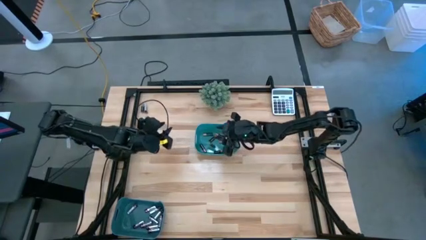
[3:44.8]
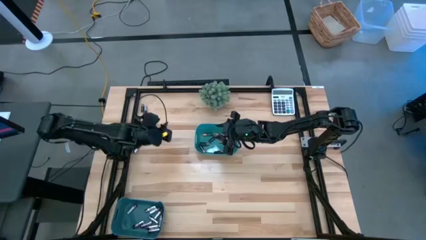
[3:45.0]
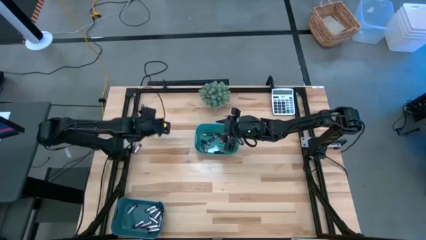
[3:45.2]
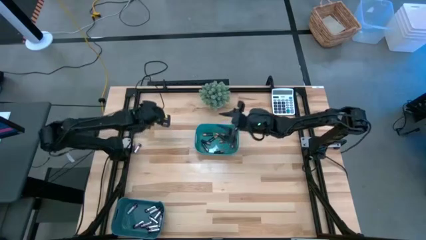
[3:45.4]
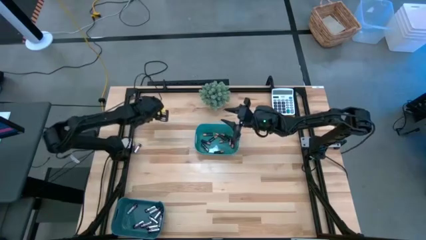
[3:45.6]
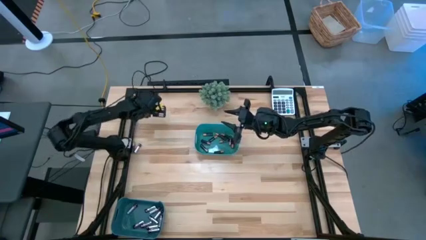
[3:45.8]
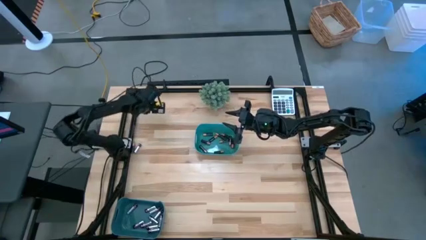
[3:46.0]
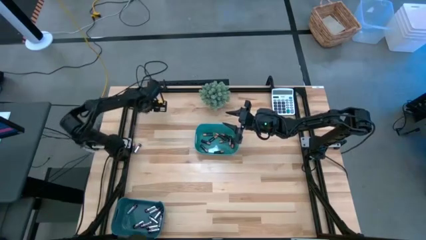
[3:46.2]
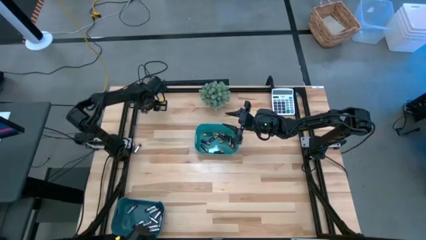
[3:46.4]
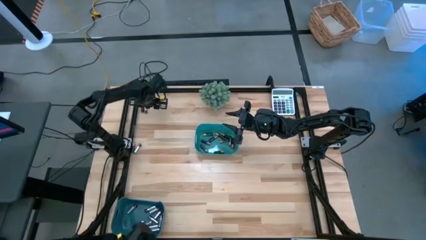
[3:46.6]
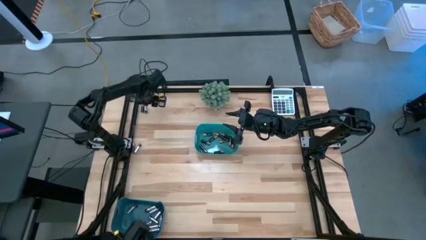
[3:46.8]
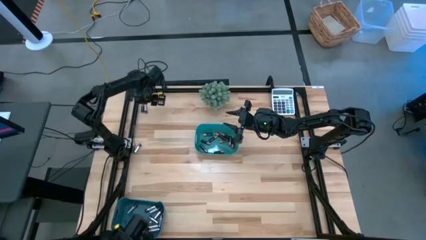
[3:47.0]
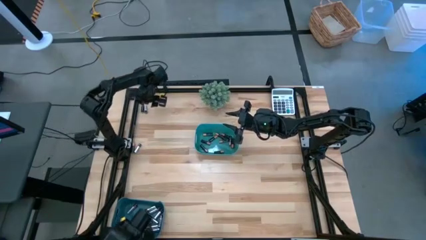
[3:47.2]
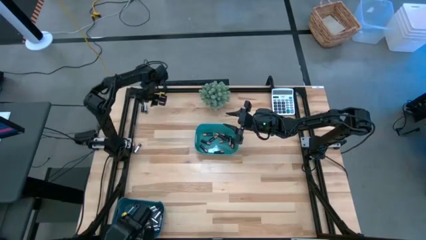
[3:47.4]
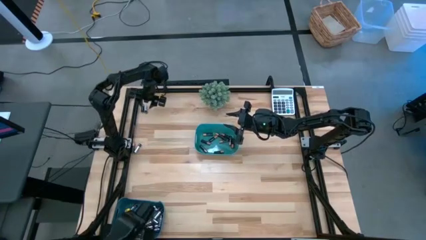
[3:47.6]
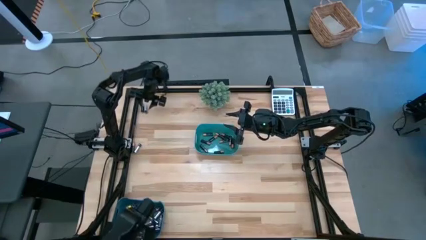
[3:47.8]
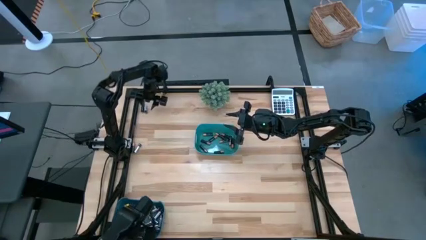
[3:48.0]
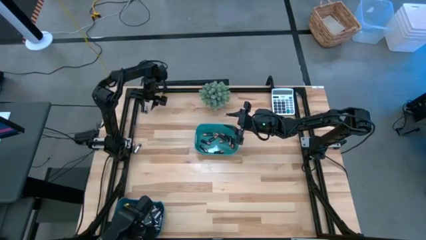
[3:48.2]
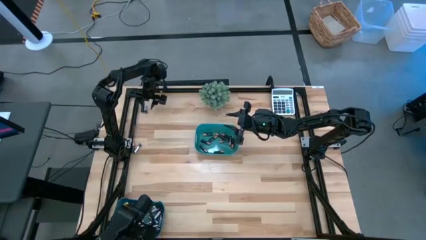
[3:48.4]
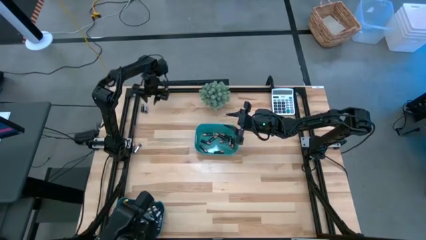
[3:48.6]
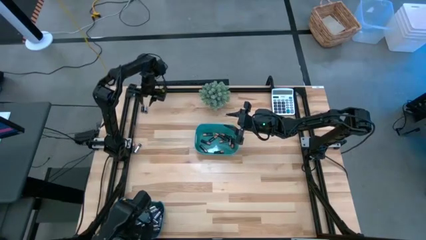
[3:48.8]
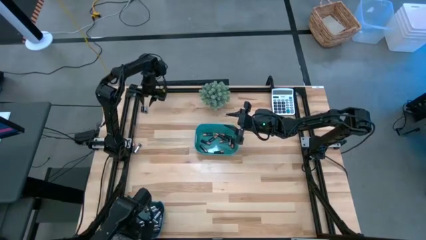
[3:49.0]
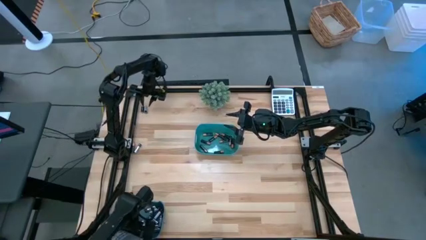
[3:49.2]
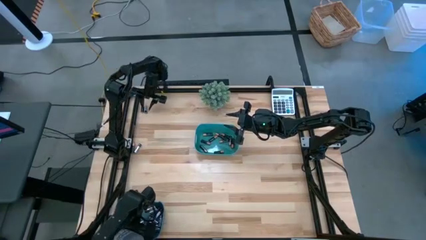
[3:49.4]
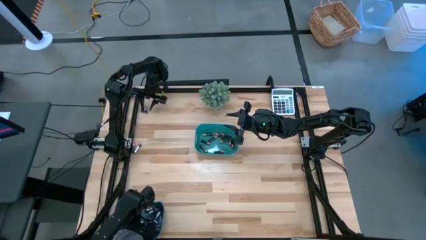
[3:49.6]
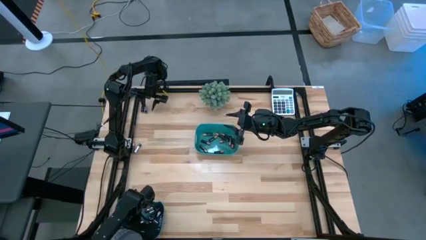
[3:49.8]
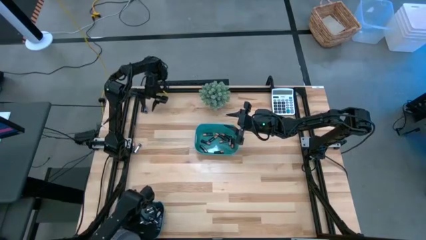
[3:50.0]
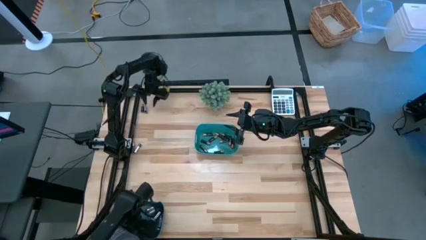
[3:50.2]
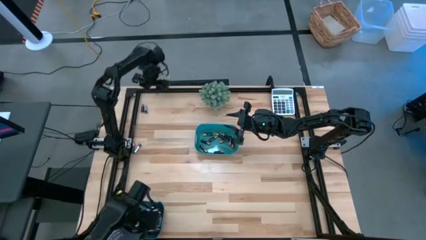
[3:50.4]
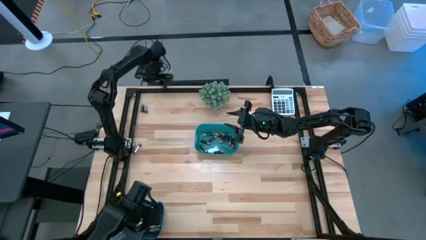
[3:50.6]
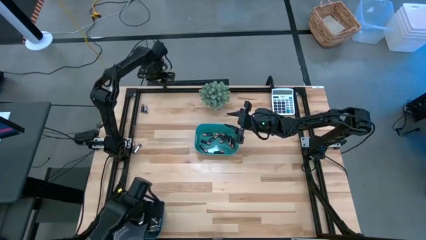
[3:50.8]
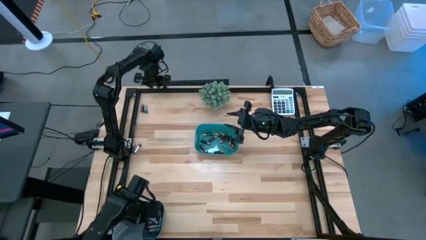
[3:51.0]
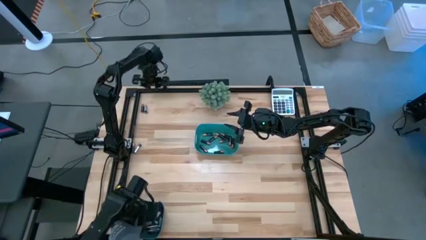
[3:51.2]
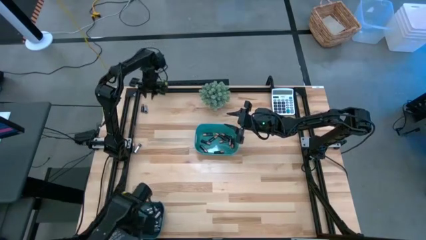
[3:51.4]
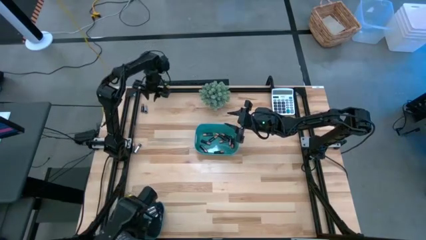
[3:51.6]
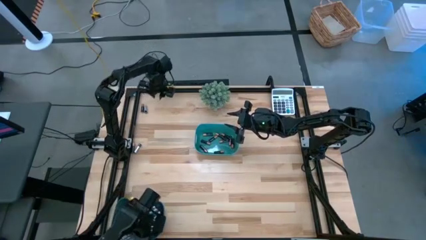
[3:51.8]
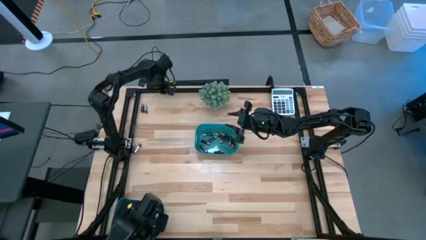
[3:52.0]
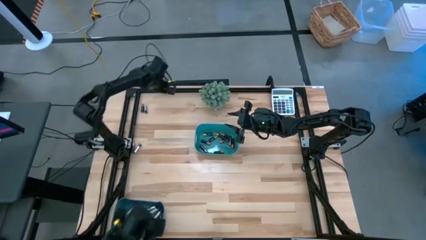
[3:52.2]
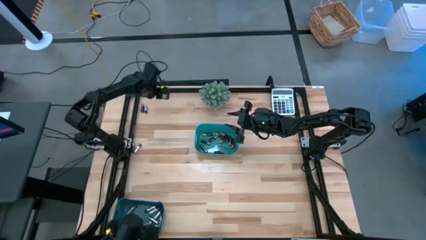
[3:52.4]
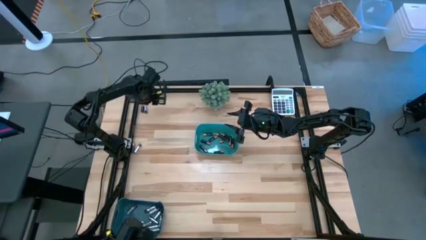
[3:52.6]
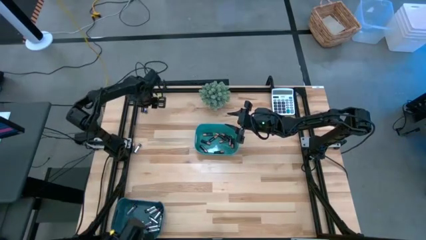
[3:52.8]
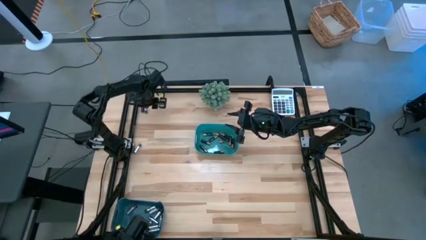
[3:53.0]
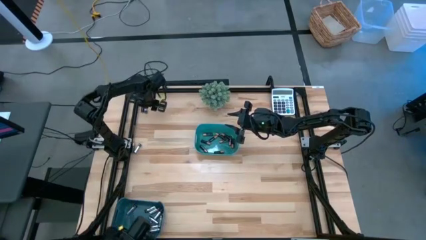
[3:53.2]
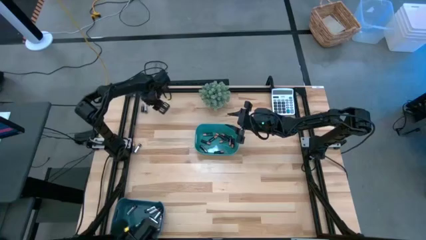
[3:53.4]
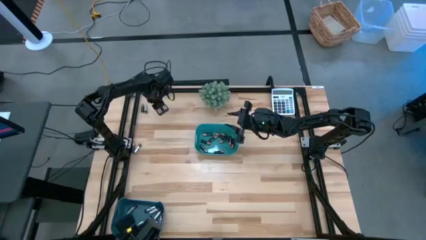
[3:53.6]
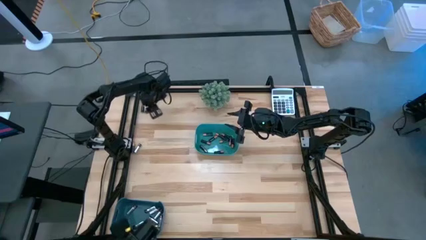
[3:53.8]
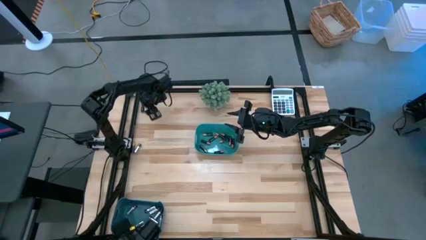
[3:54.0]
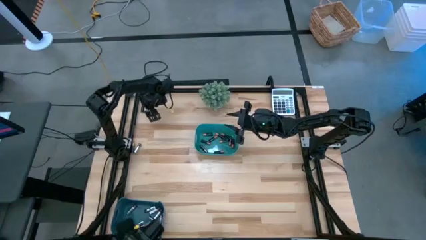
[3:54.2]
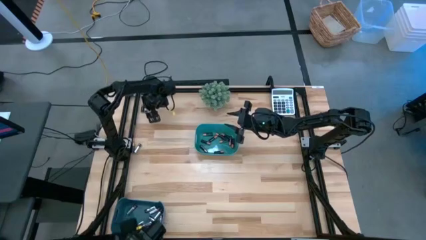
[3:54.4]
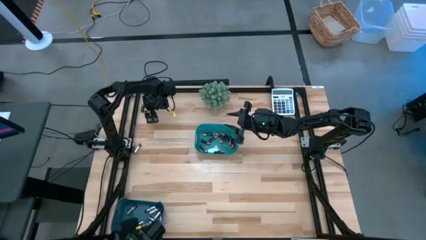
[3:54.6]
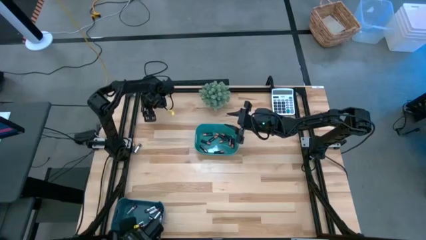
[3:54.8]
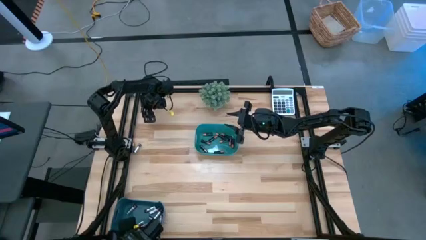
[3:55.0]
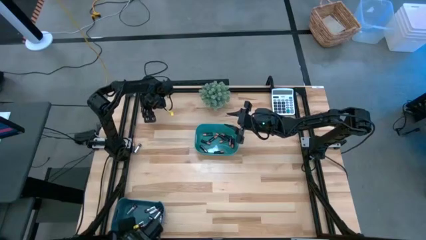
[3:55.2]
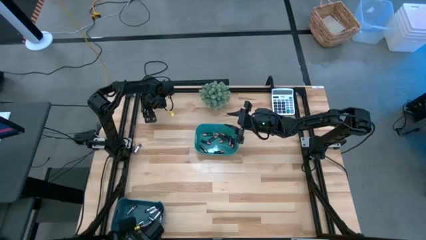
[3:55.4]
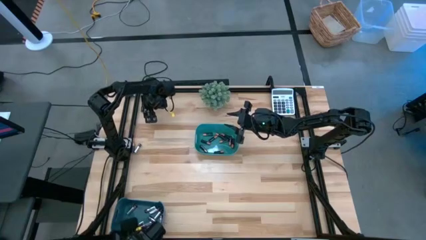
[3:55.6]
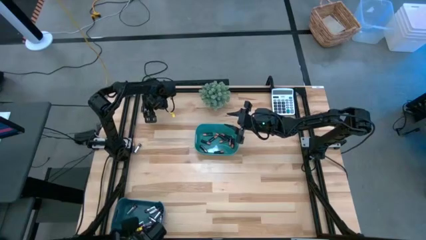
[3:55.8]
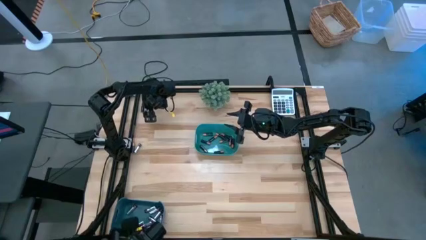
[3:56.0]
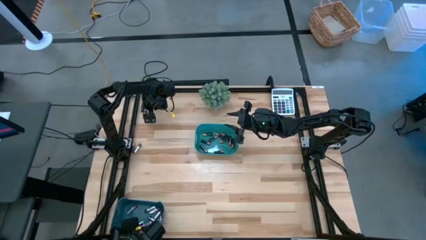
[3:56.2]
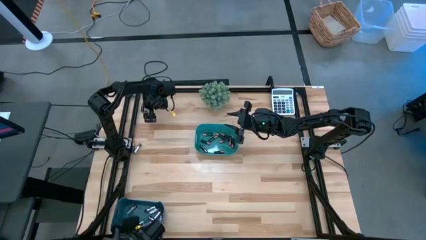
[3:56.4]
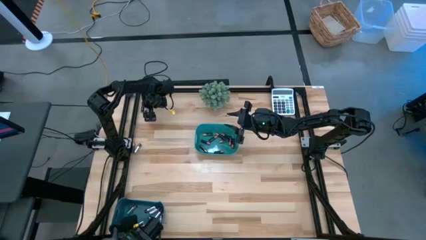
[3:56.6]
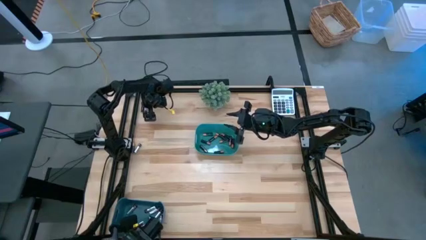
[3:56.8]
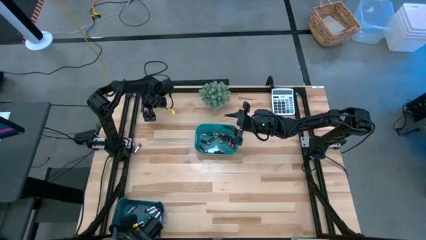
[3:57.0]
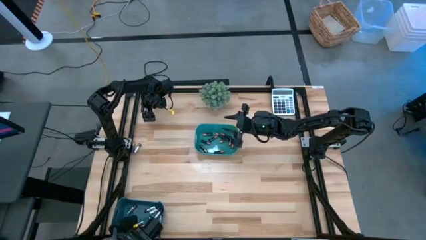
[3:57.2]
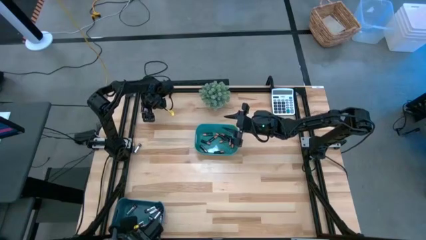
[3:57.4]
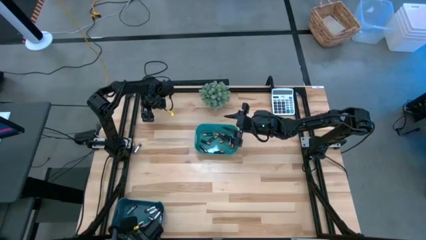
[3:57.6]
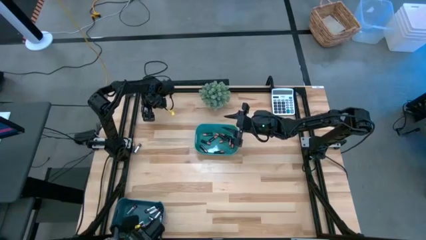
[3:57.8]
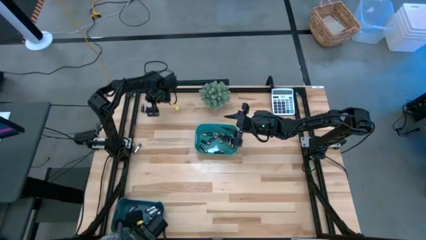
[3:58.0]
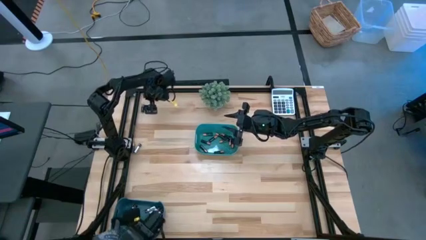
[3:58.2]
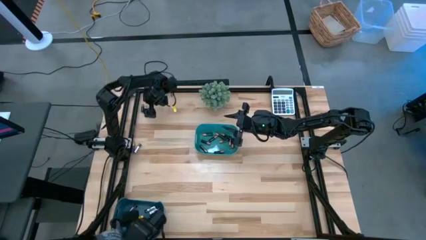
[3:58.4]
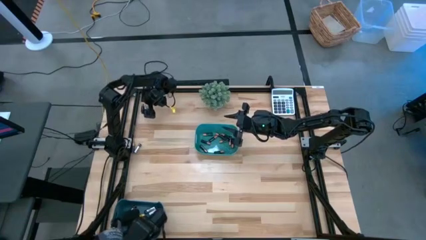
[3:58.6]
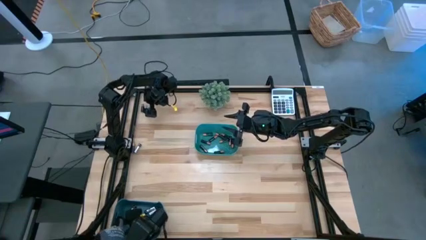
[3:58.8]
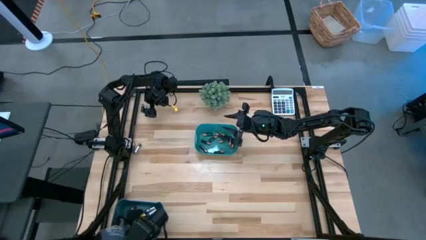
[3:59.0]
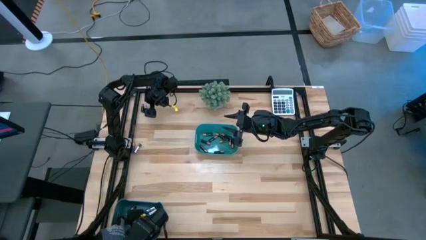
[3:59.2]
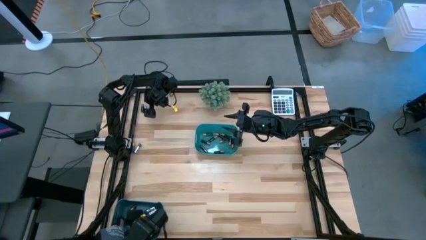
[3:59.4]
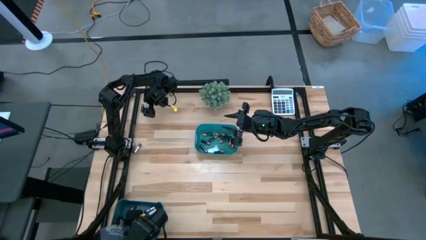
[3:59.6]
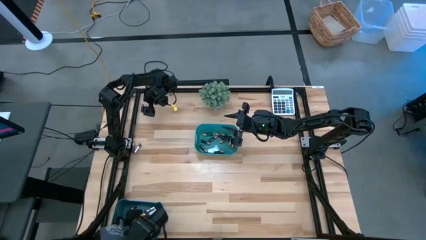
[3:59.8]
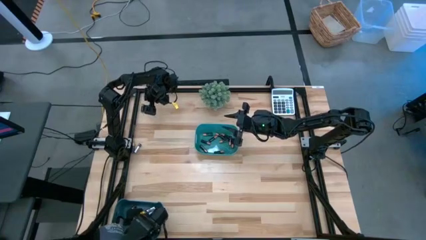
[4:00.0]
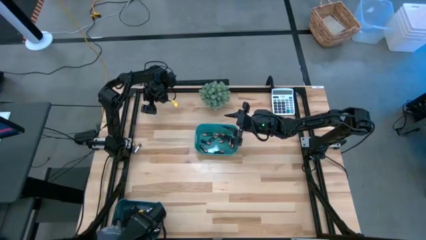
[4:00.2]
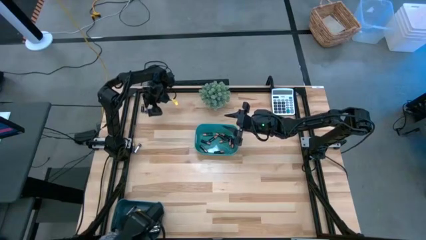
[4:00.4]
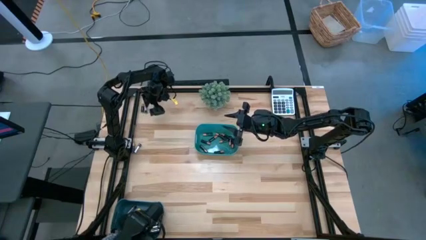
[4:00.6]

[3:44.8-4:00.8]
Task: Sort batteries
Put the silver battery into the blue bin
